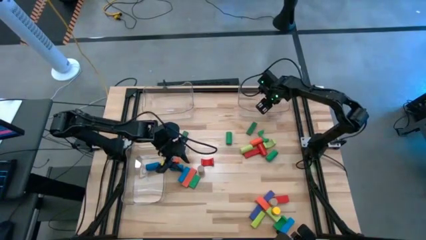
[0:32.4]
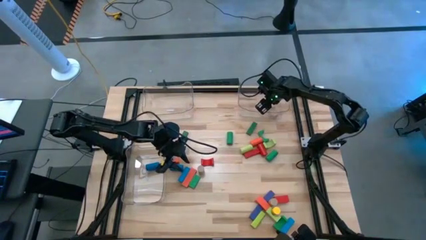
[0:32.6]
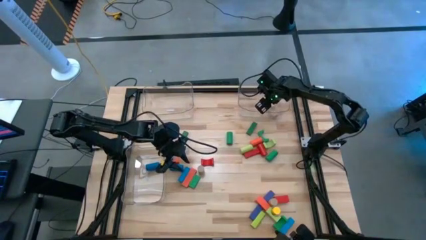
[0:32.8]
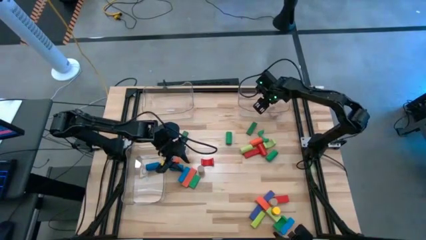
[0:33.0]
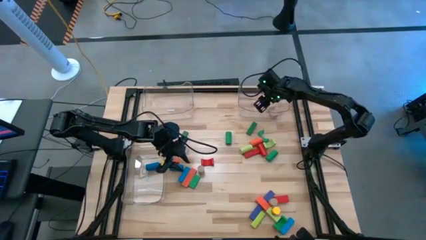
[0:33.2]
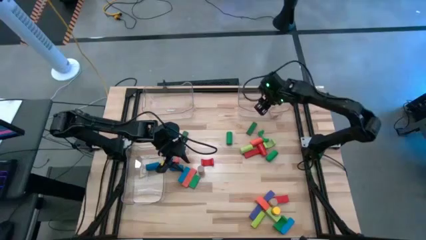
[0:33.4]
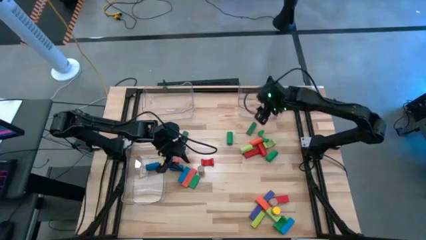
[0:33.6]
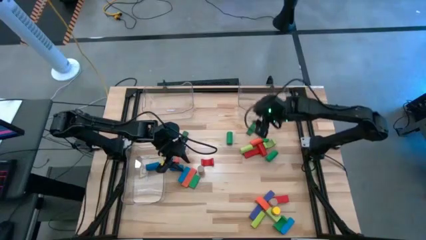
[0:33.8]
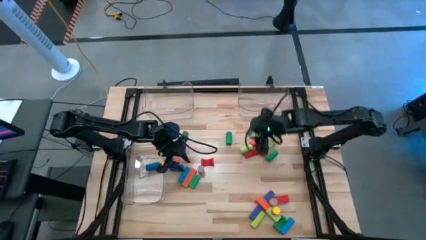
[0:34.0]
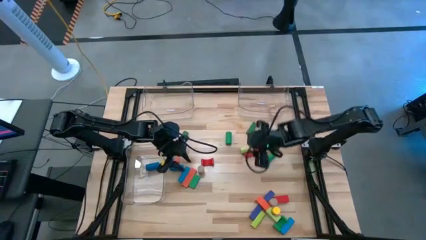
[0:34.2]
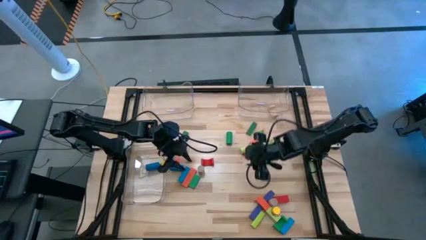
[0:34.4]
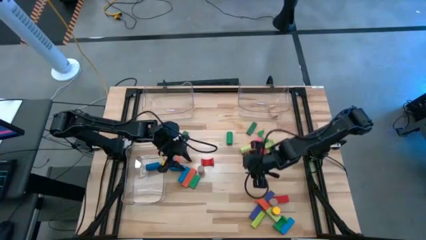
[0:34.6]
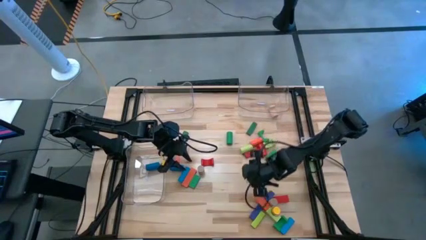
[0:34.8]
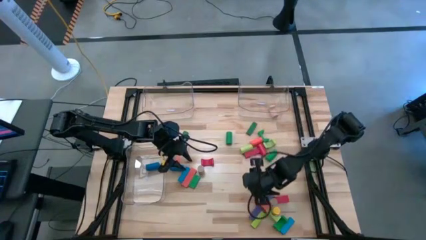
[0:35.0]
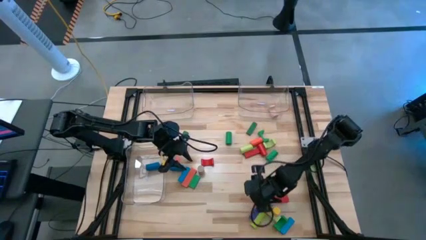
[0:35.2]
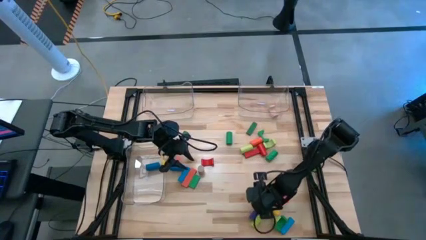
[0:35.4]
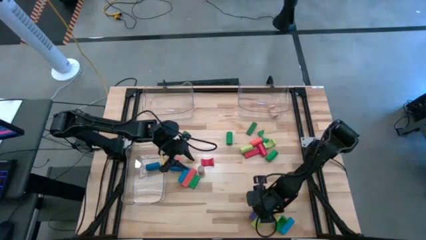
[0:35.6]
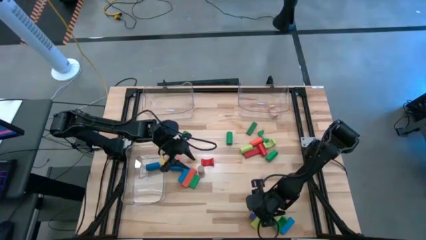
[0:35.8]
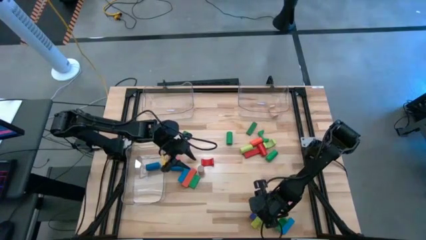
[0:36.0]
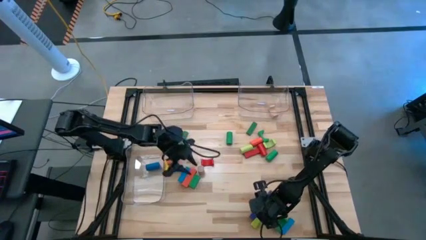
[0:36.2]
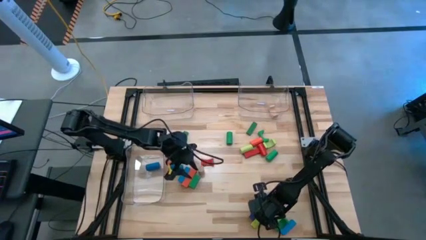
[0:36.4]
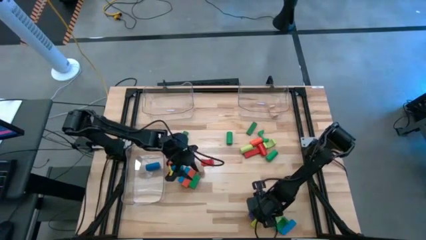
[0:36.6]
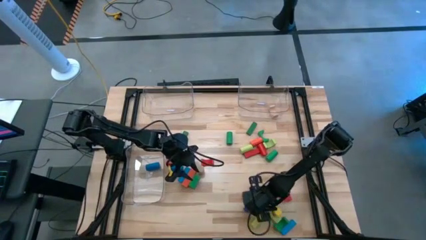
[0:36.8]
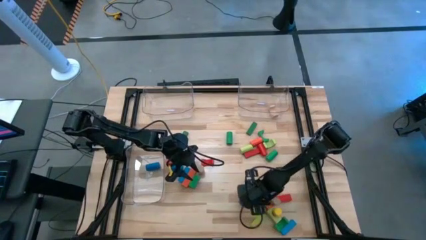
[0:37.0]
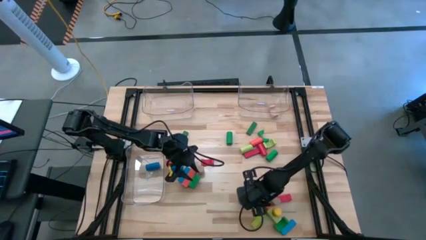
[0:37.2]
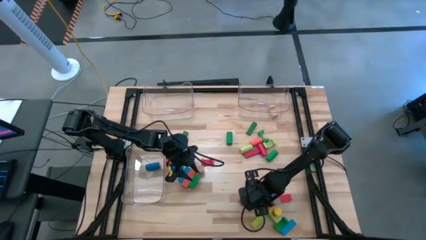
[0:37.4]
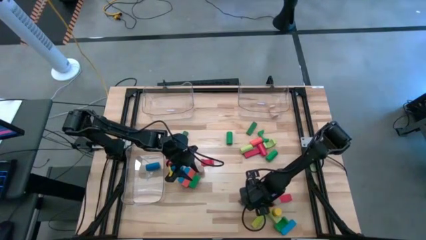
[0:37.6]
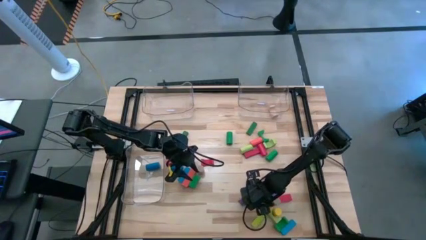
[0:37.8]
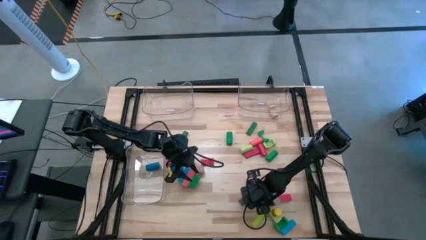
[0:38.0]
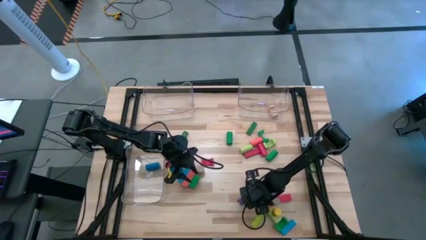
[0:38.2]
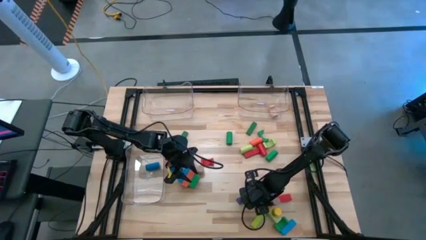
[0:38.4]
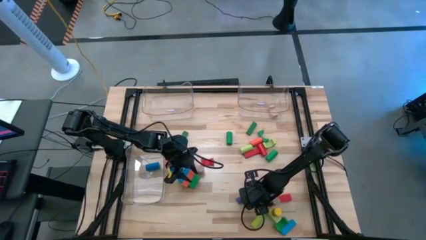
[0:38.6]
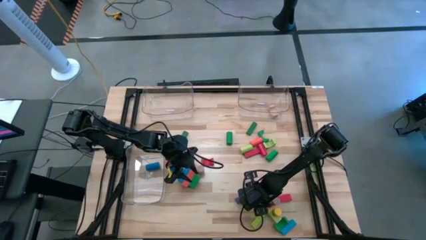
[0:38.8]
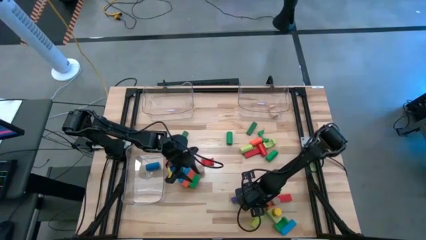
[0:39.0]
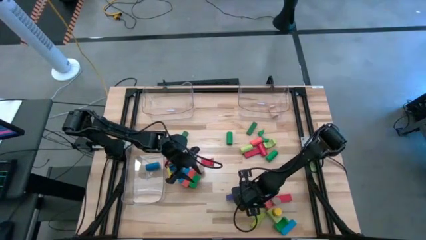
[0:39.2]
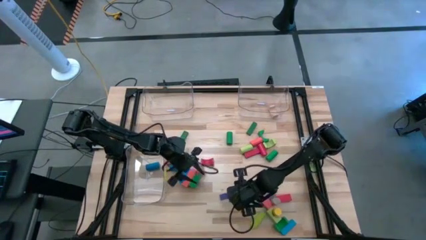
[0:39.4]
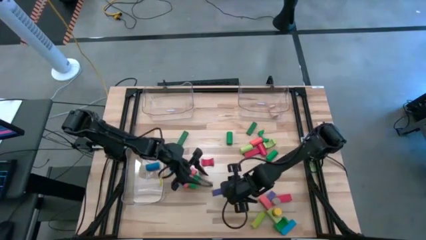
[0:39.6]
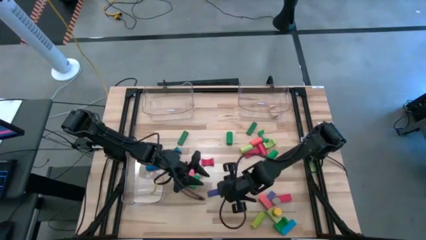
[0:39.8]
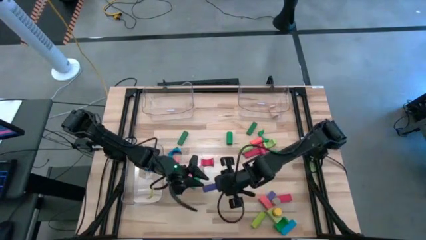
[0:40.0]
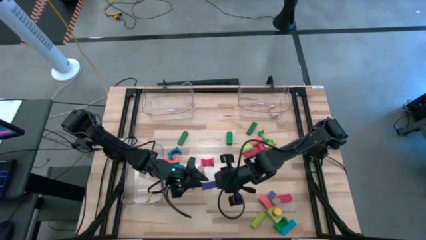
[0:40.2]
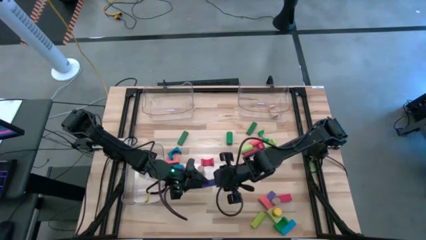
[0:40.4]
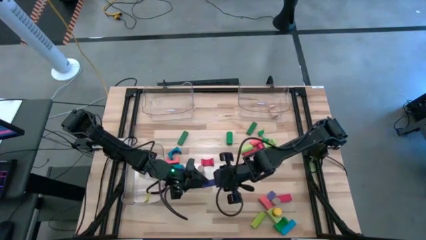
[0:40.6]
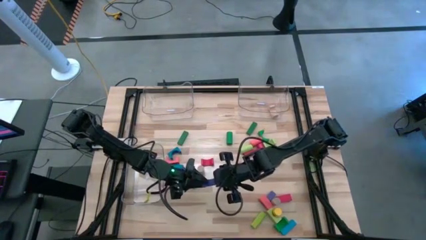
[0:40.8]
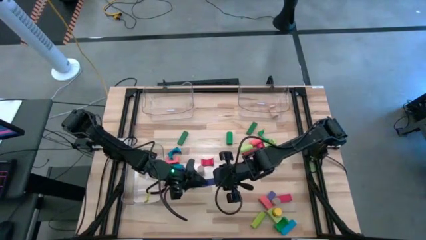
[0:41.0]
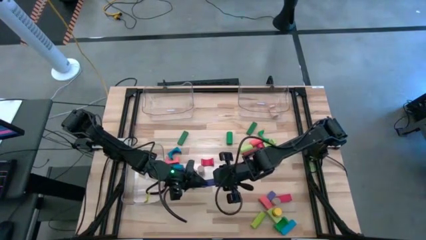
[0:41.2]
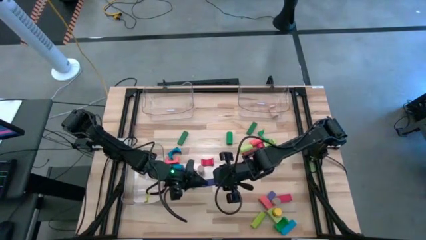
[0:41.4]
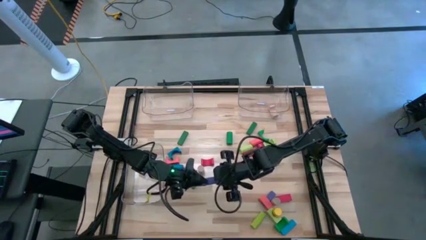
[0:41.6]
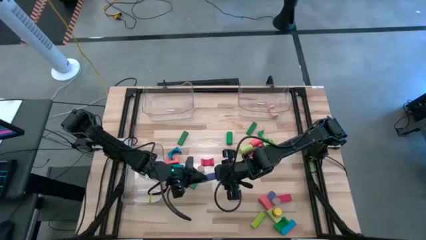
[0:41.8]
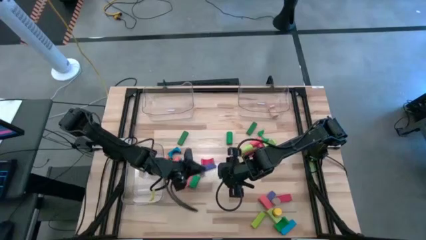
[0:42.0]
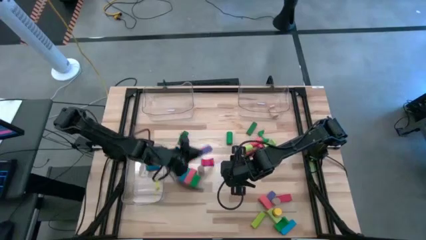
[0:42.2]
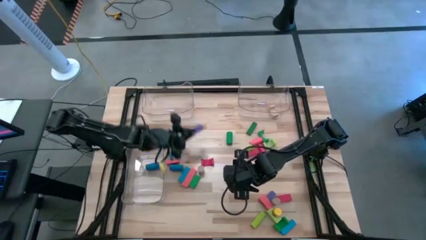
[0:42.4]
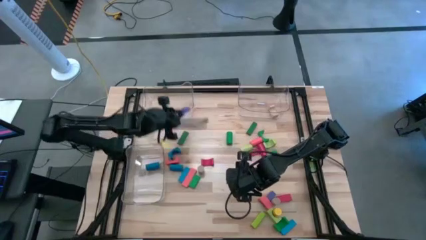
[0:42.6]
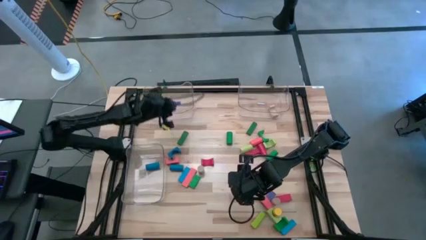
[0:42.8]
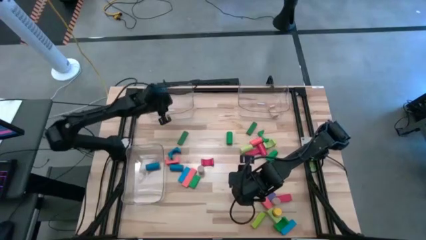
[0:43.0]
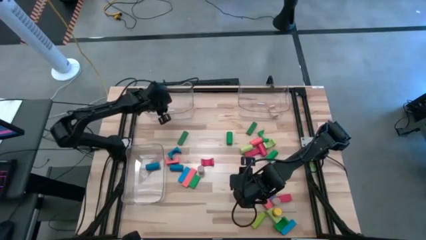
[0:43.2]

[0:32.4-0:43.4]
Task: Sort blocks by size
Put the blue rectangular block into the top left transparent bin

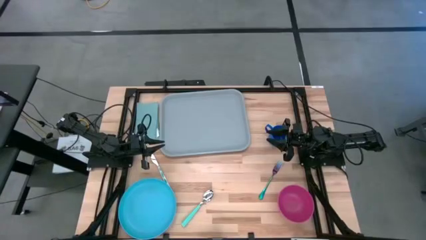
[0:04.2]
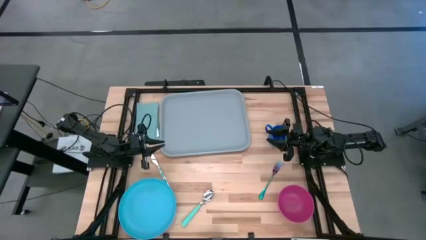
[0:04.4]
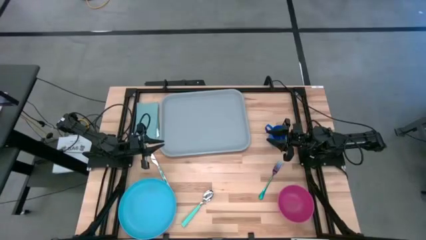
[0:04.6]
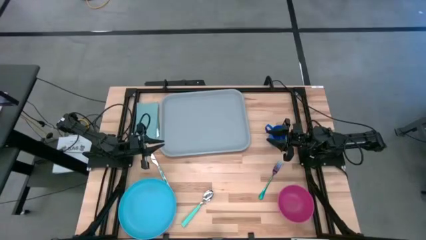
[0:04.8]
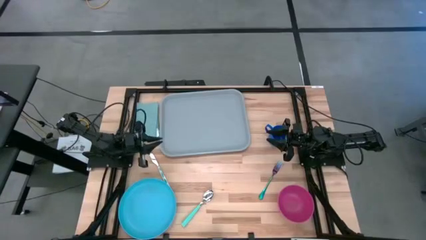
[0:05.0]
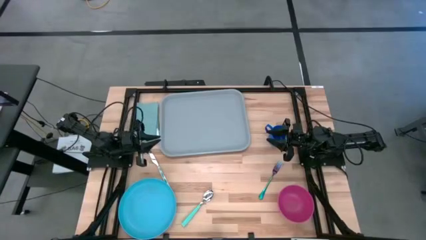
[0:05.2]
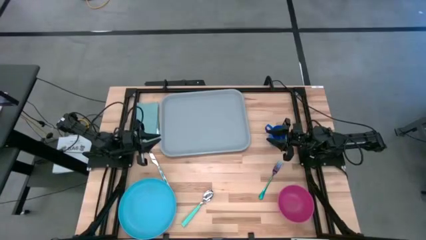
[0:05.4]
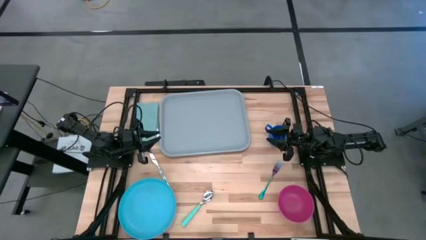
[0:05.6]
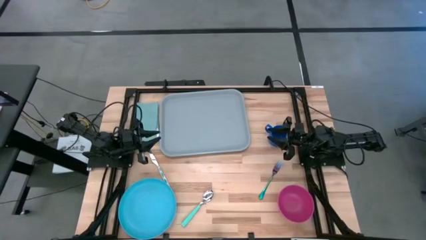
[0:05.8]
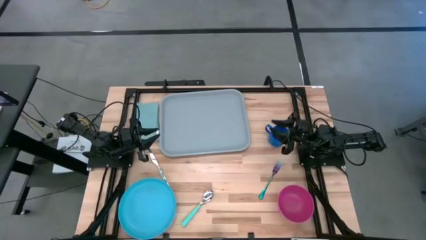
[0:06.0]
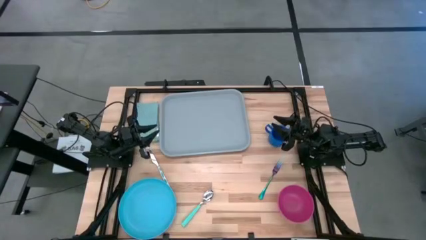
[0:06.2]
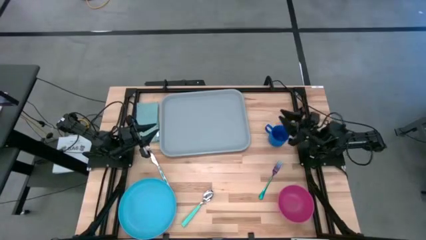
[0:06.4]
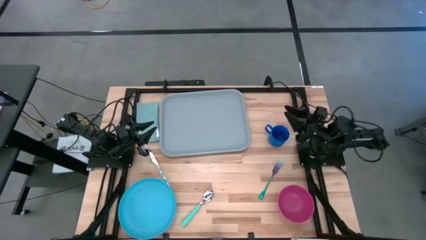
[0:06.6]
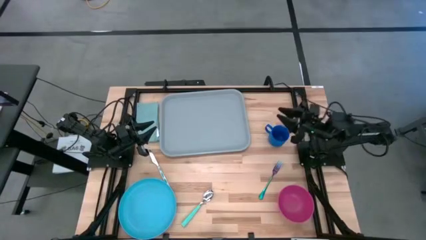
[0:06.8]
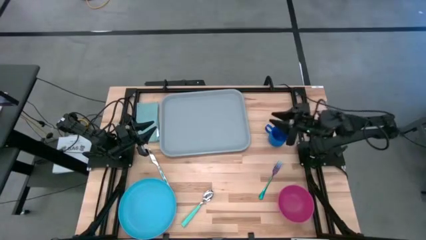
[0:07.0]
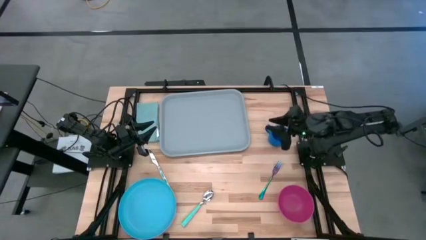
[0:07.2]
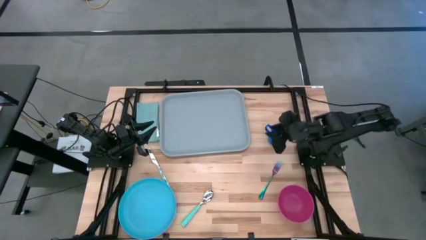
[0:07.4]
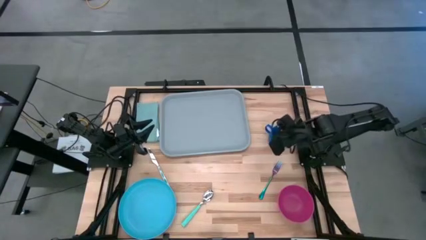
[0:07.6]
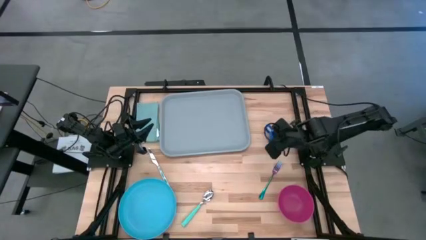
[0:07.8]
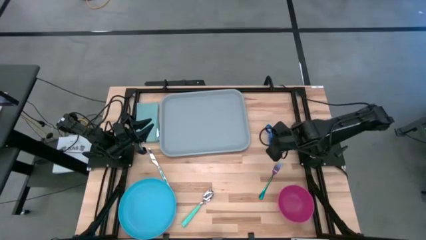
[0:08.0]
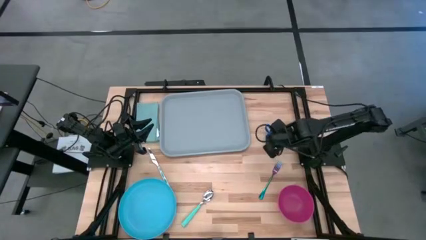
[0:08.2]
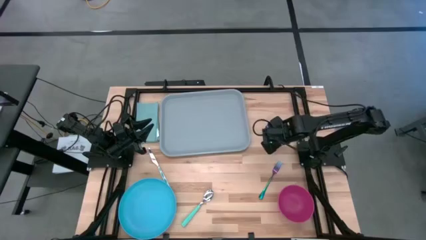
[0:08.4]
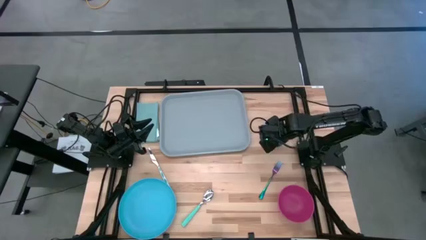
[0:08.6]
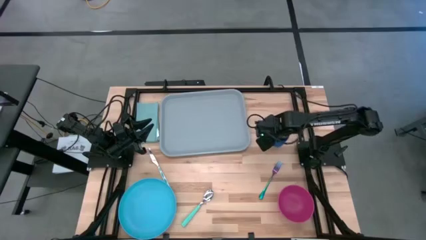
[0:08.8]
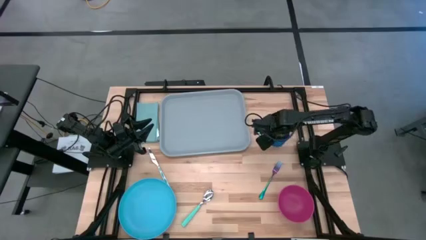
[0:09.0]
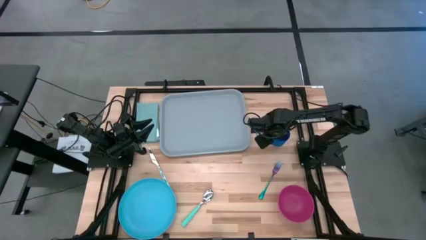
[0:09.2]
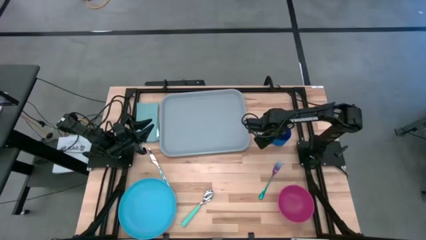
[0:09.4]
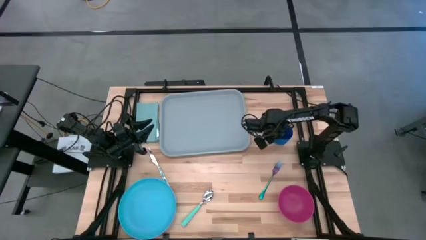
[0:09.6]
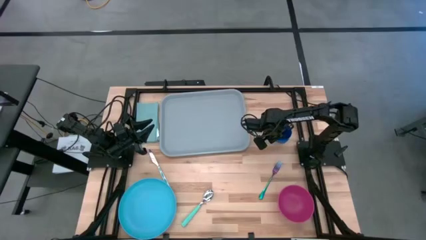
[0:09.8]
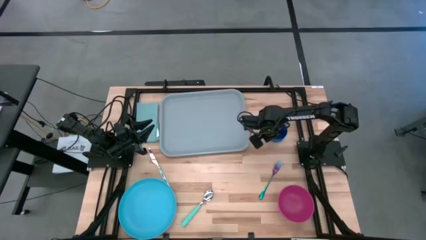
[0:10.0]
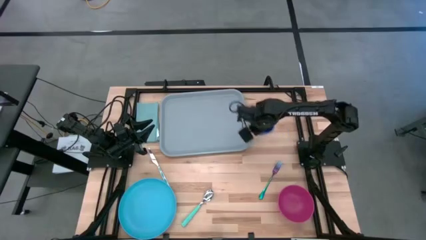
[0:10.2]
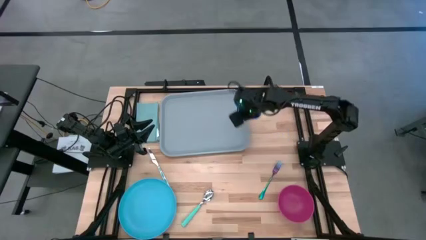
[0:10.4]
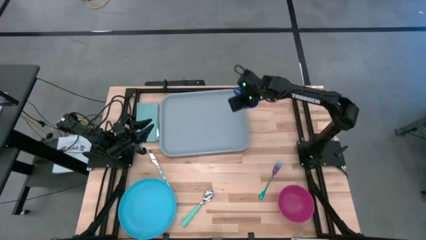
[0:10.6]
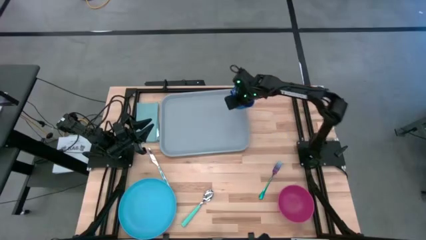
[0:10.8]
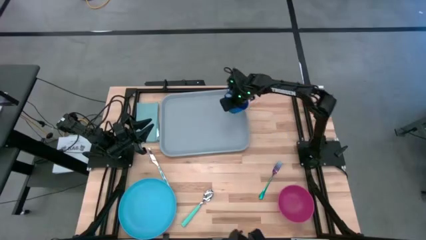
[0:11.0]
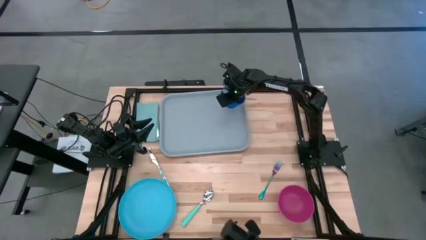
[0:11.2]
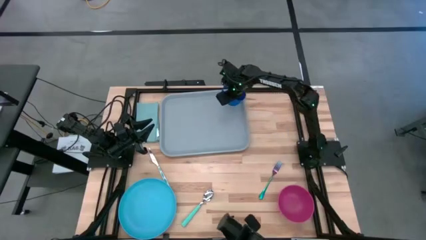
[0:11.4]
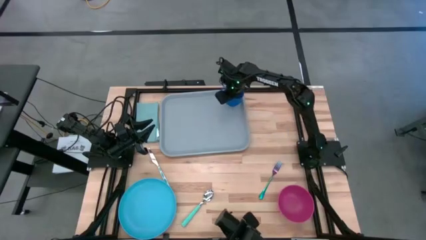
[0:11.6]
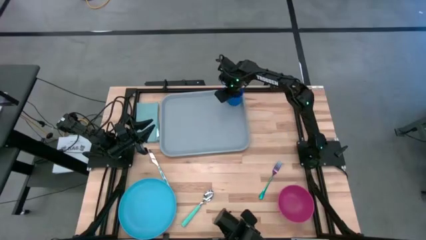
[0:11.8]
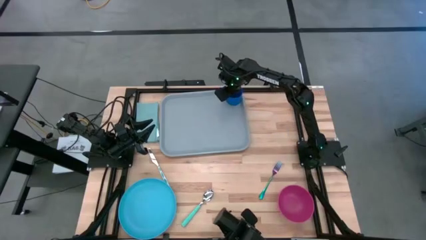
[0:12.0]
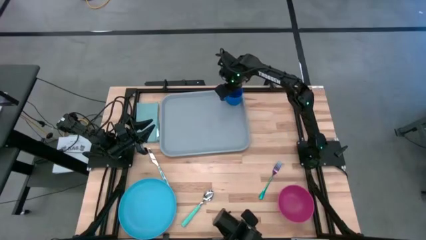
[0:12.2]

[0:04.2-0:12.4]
Task: Set up tray
Put the blue cup on the gray tray
